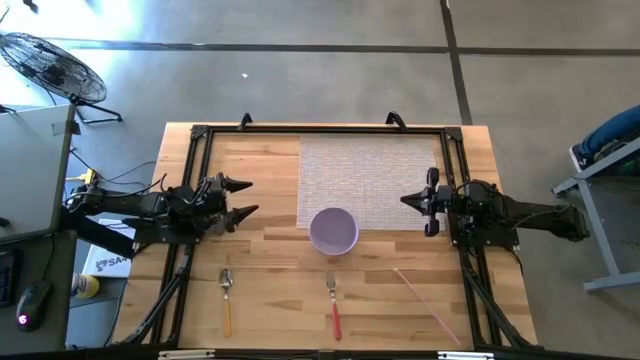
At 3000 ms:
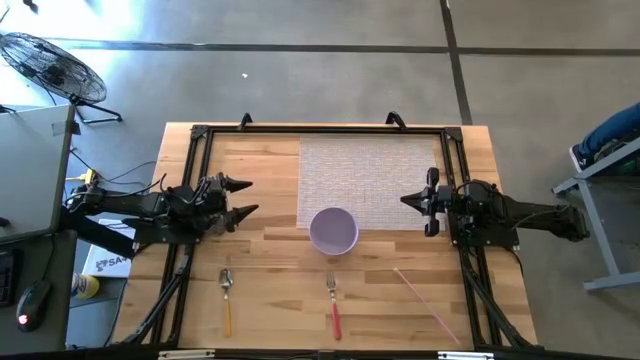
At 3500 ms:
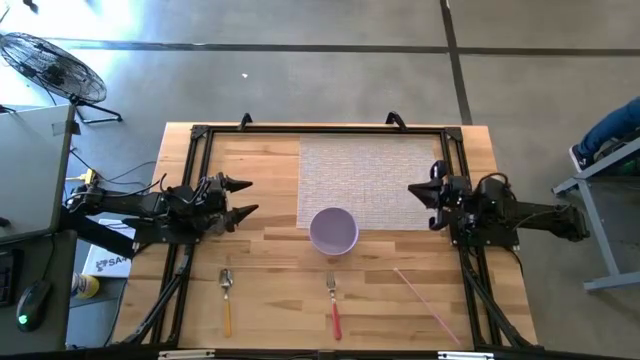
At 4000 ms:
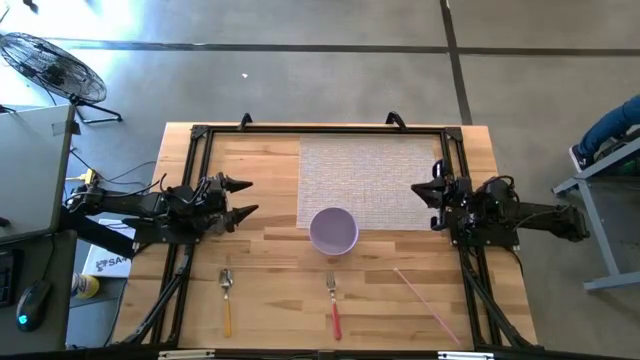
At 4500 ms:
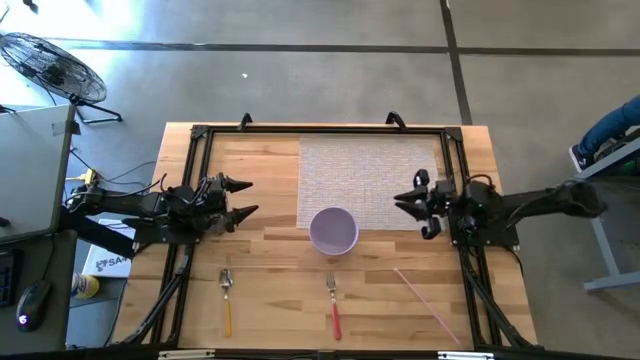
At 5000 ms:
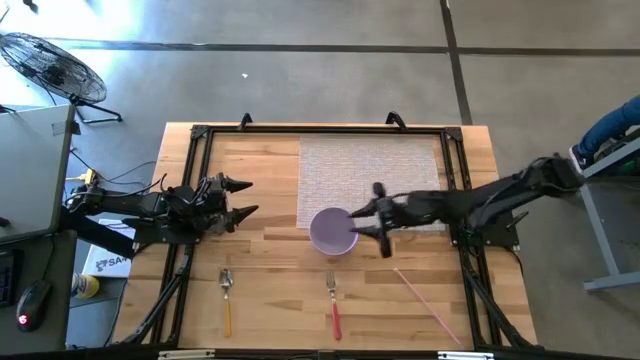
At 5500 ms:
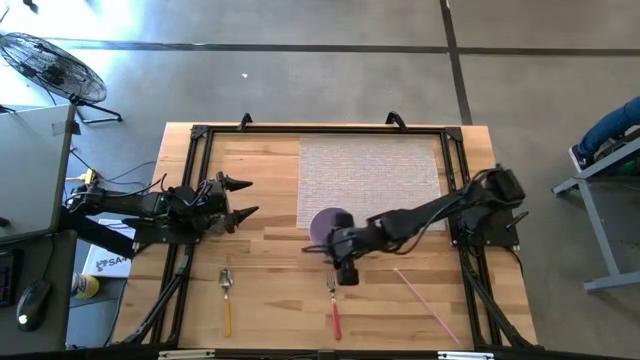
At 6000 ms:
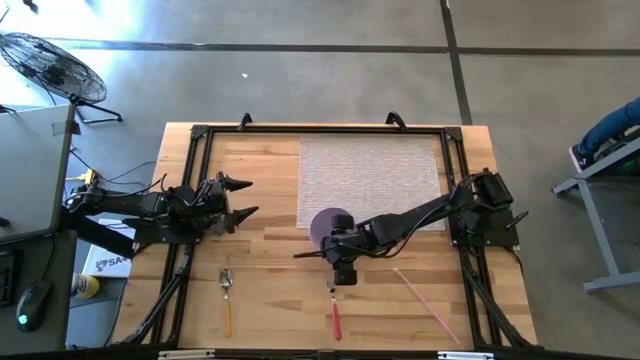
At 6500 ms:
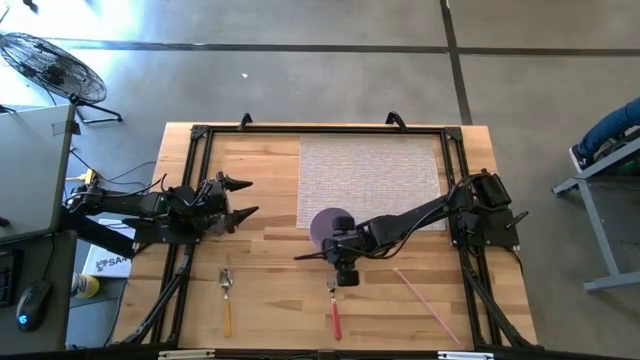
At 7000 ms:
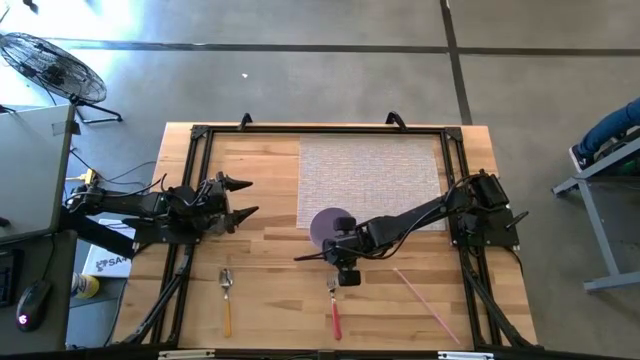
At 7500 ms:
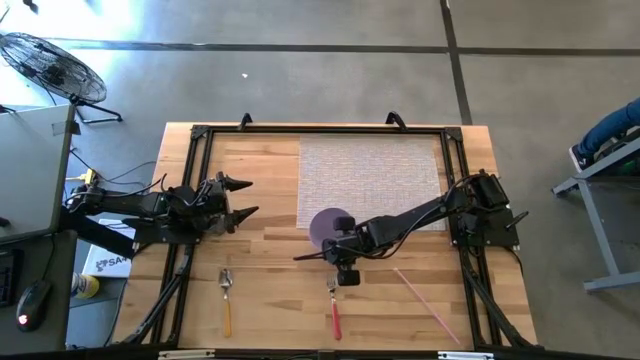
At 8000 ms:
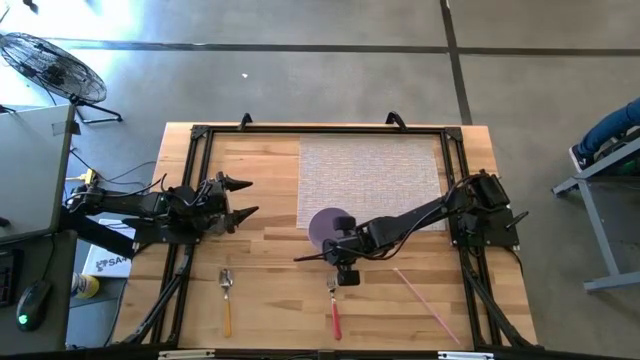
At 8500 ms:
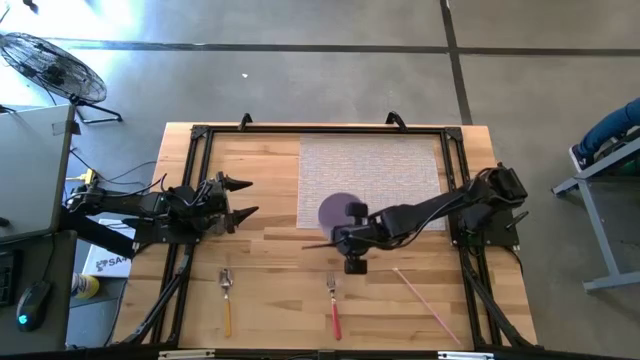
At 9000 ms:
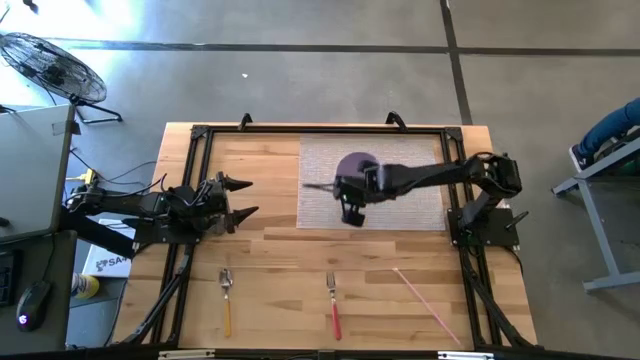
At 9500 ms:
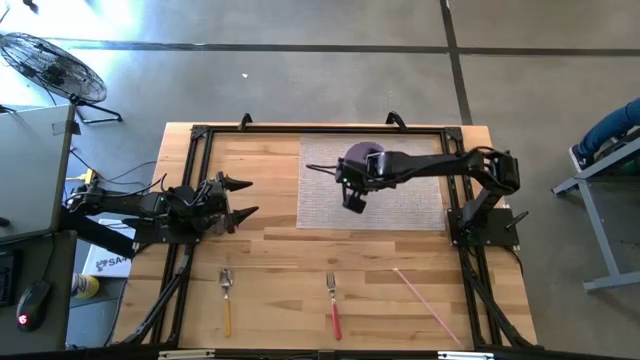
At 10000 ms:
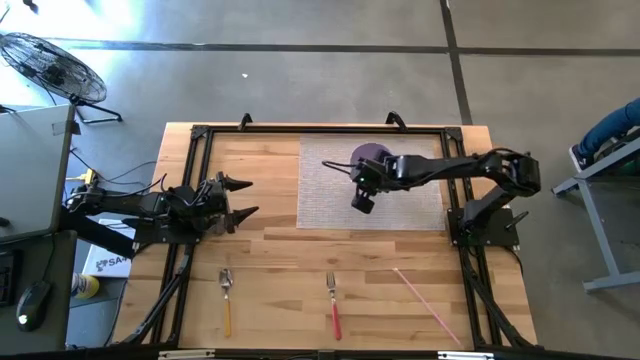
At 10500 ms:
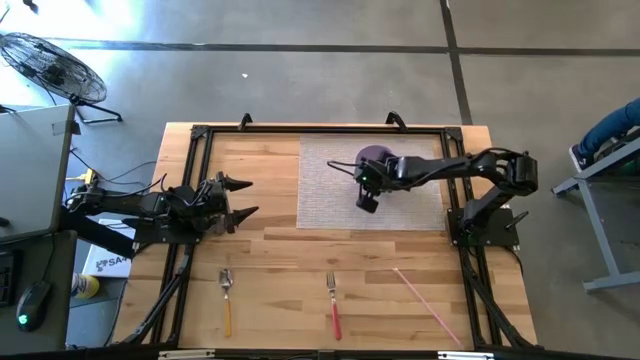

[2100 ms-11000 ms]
Task: Pick & Place Utensil
Put the purple bowl on the mat

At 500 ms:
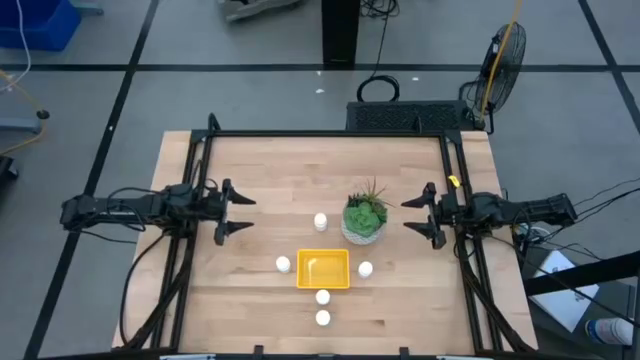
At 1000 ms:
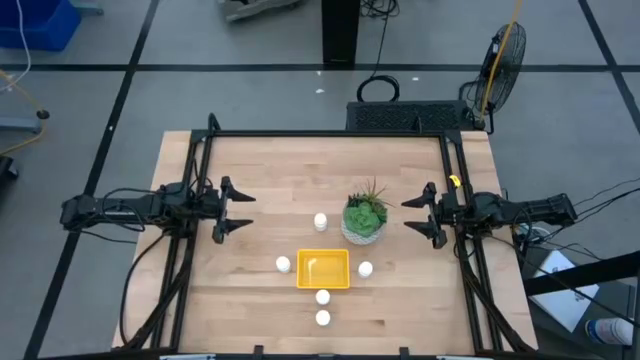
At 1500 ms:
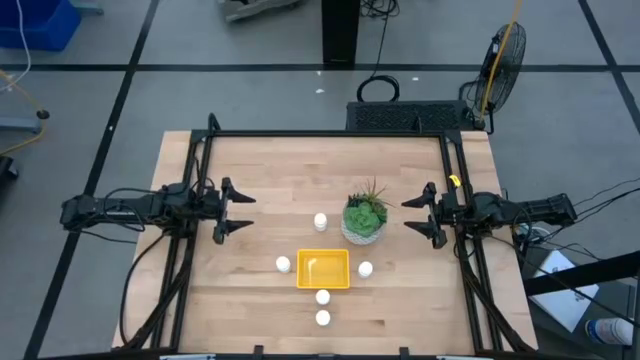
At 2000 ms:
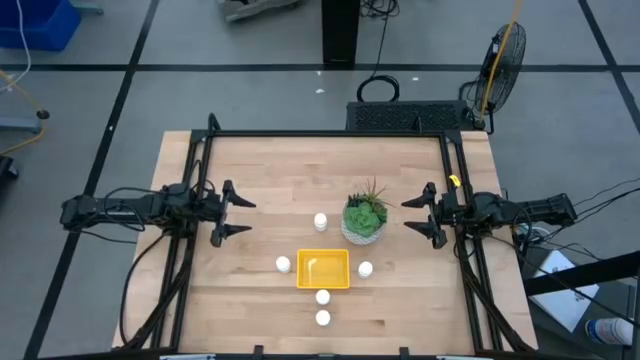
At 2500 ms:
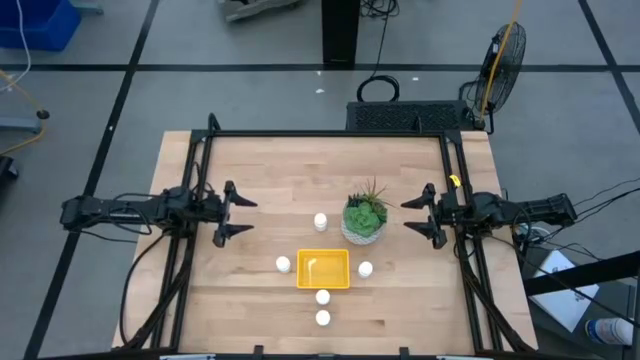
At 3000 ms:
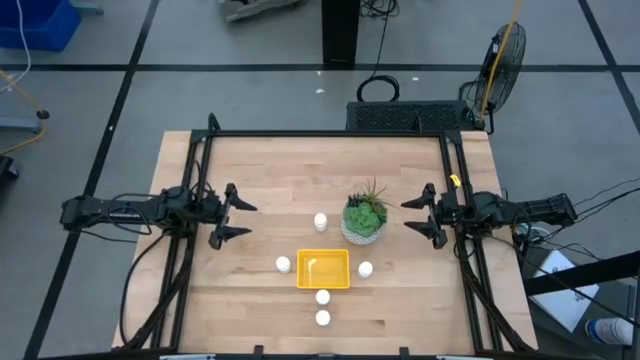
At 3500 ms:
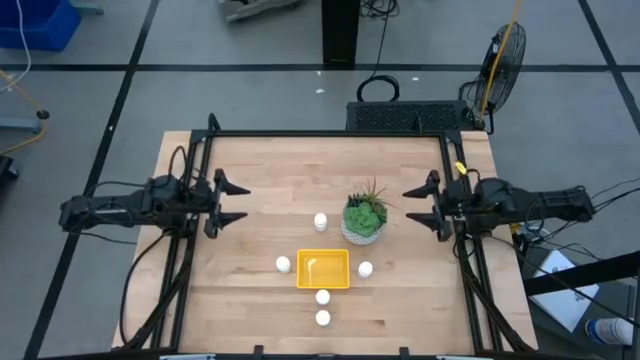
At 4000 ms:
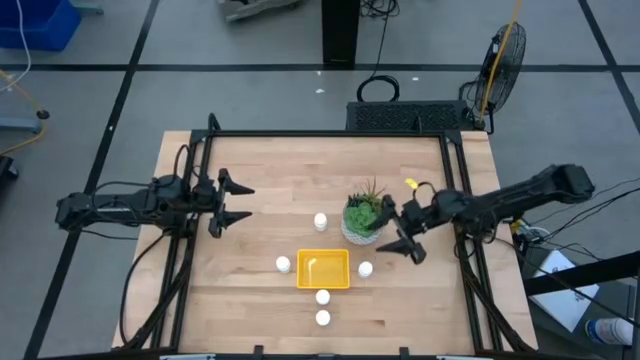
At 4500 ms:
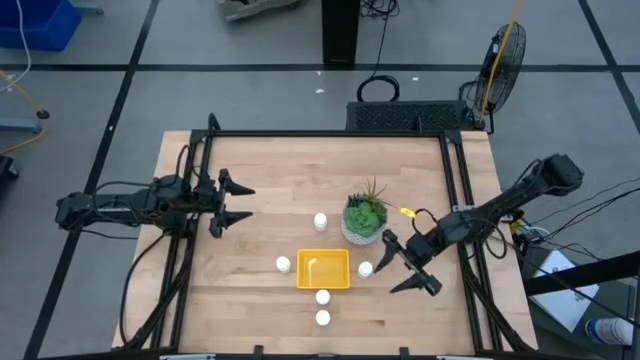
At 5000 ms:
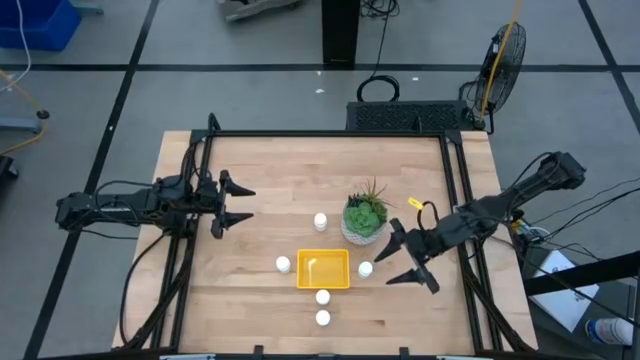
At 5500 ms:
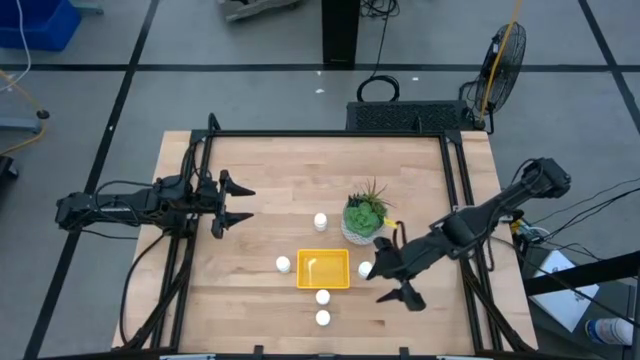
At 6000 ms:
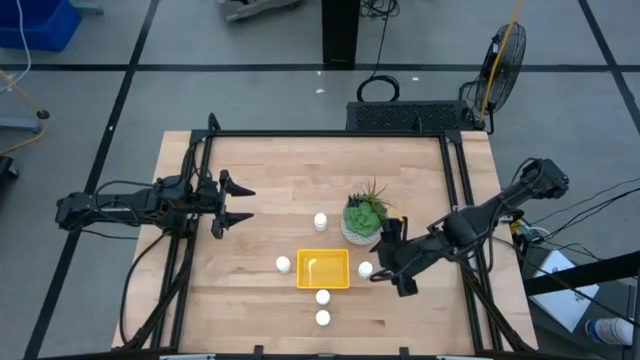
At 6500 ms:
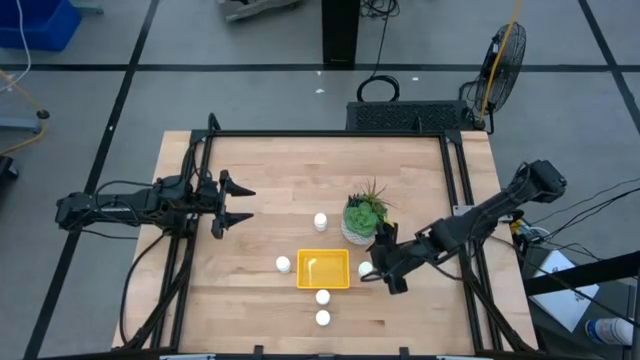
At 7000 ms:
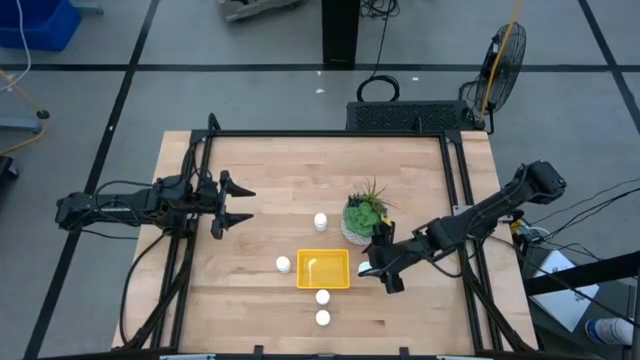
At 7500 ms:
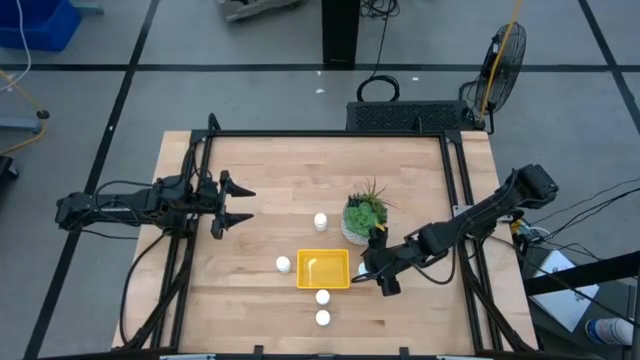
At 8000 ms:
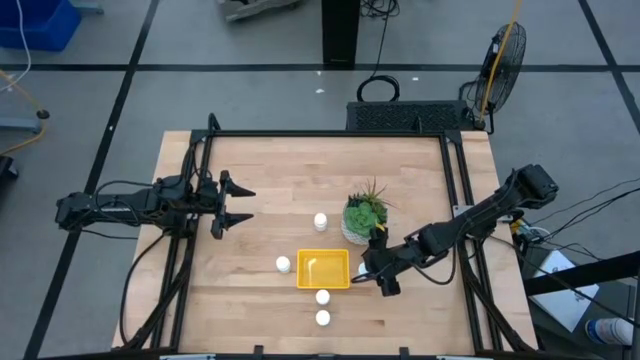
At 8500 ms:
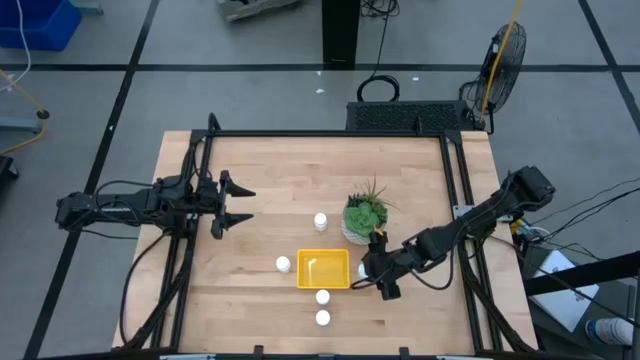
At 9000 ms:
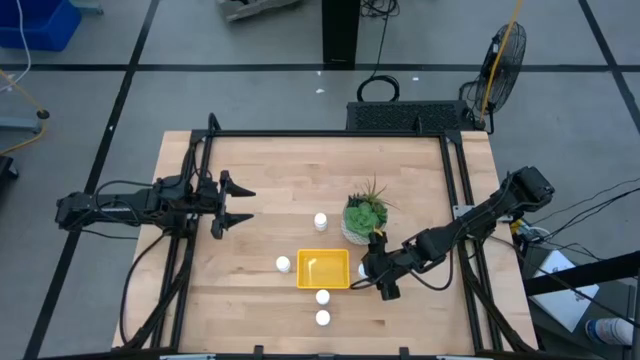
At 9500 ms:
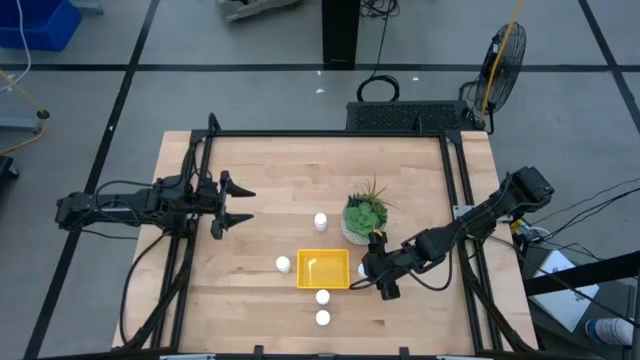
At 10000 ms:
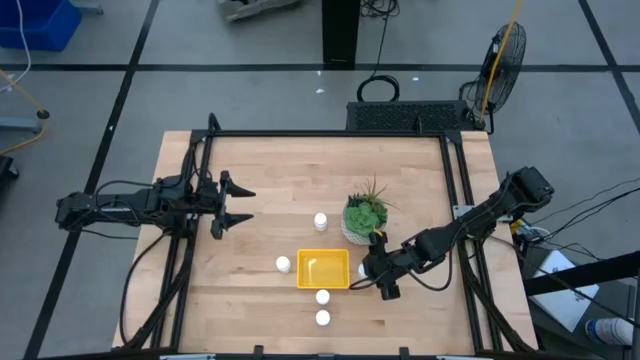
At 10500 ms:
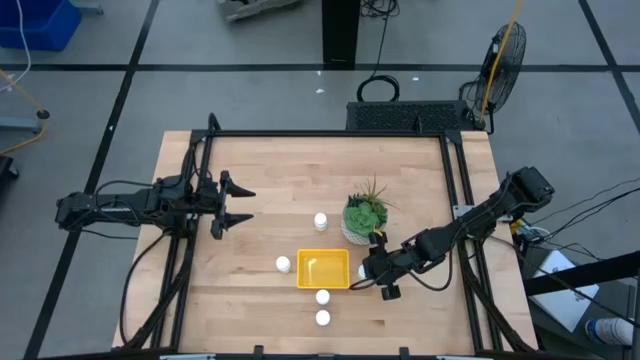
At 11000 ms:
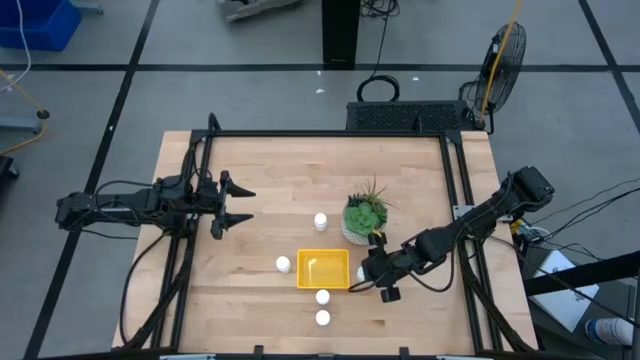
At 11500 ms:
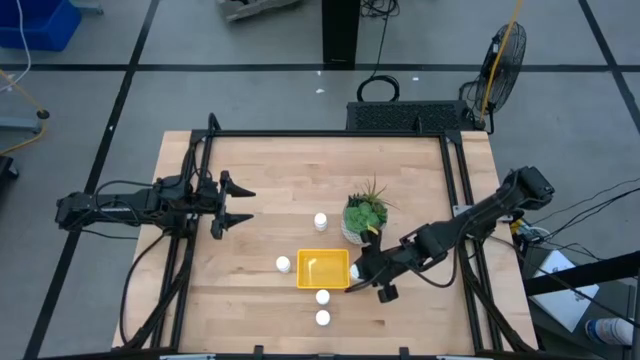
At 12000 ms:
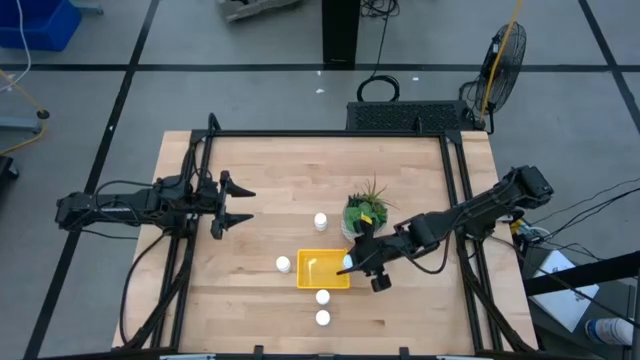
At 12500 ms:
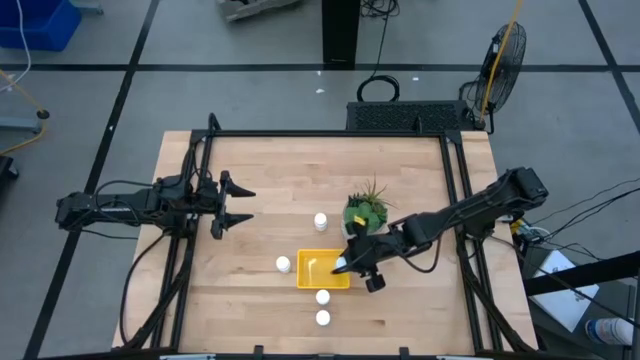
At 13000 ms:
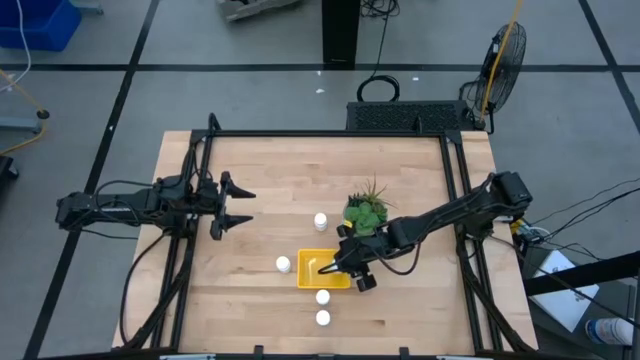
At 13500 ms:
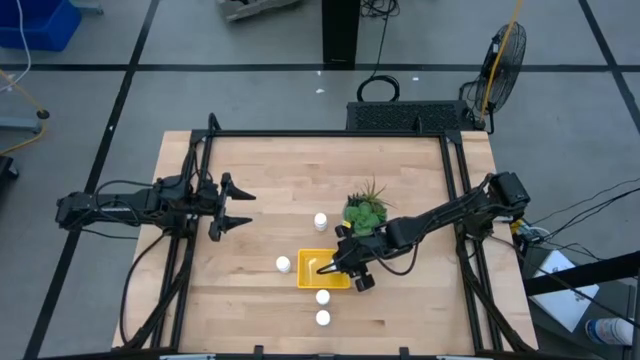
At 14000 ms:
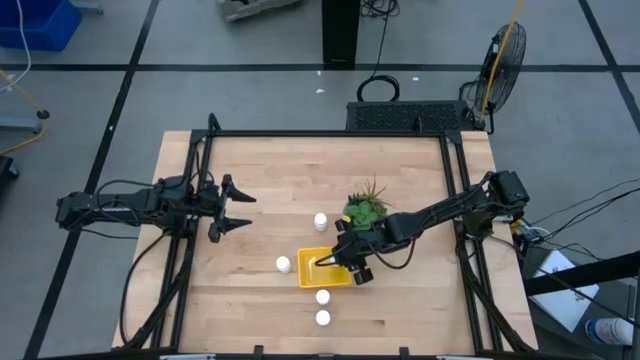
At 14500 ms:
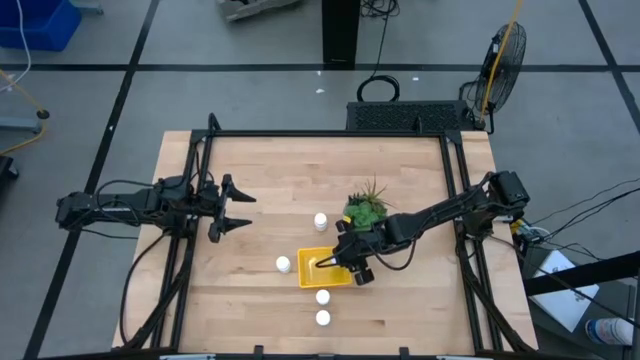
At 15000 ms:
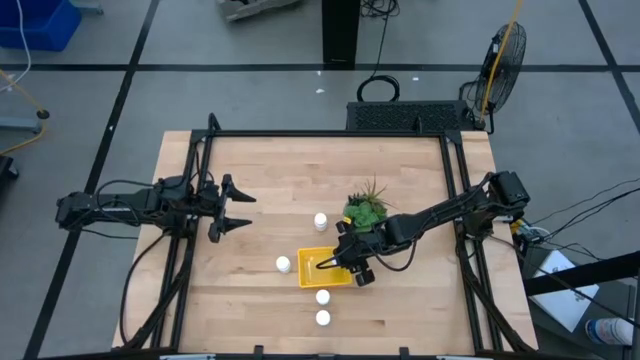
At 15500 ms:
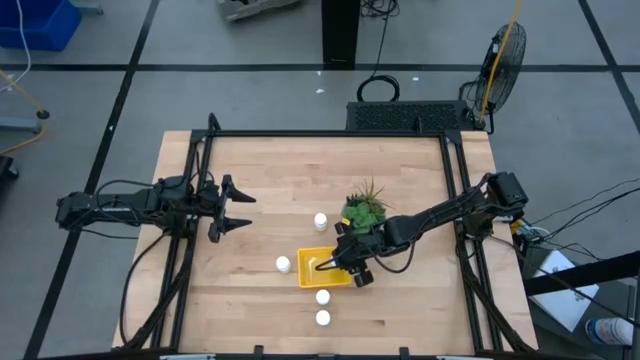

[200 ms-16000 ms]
Task: Pick and place pill bottles into a basket
Put the white pill bottle into the yellow bin
